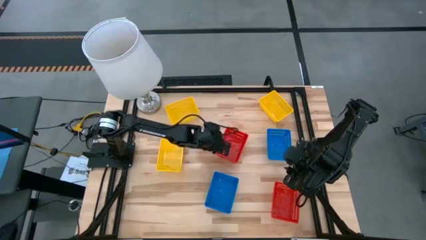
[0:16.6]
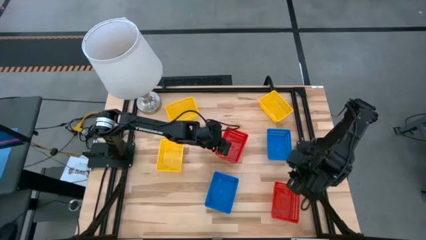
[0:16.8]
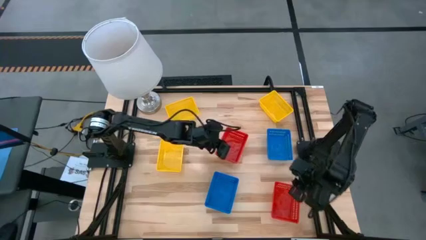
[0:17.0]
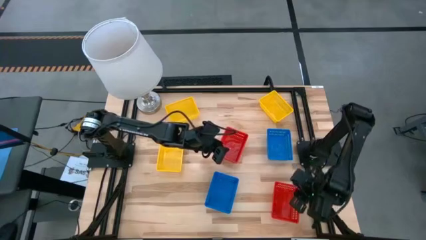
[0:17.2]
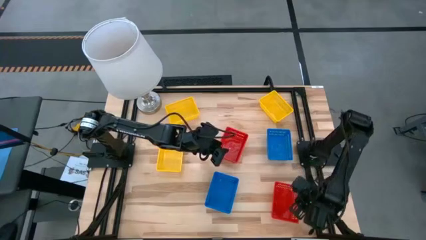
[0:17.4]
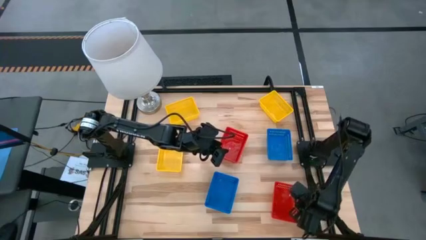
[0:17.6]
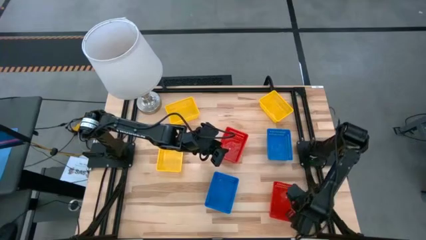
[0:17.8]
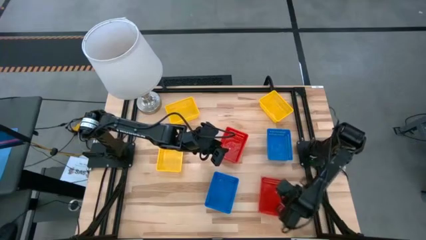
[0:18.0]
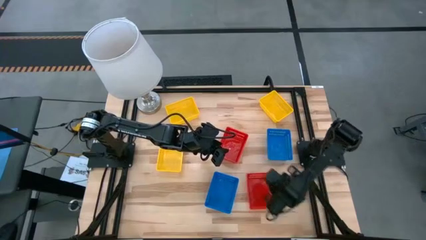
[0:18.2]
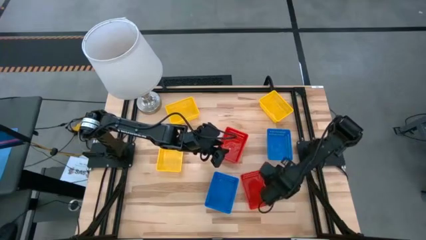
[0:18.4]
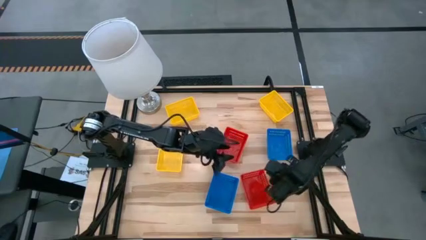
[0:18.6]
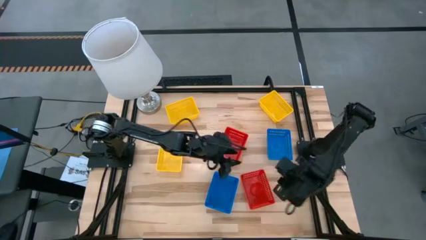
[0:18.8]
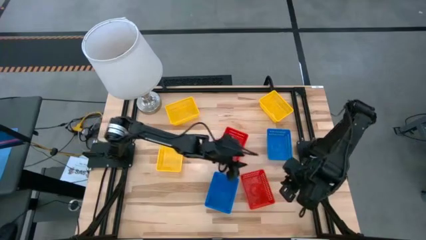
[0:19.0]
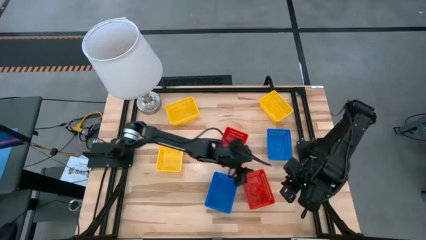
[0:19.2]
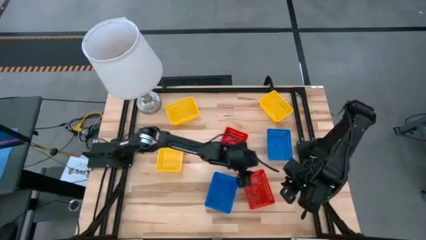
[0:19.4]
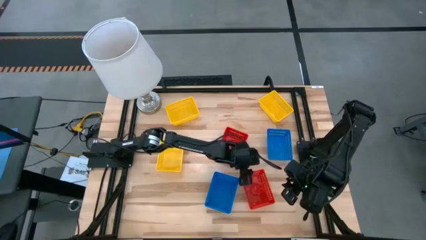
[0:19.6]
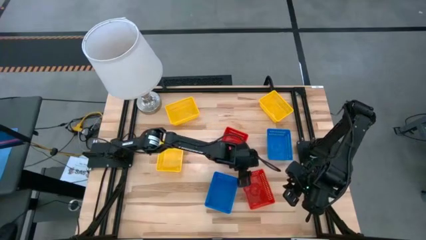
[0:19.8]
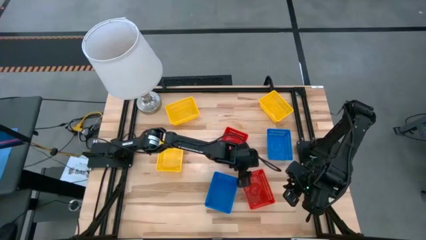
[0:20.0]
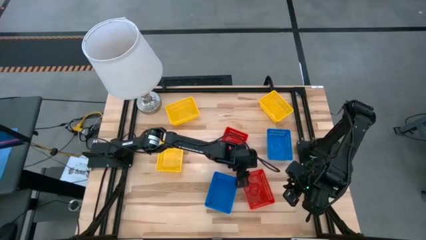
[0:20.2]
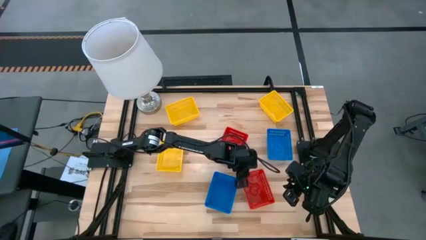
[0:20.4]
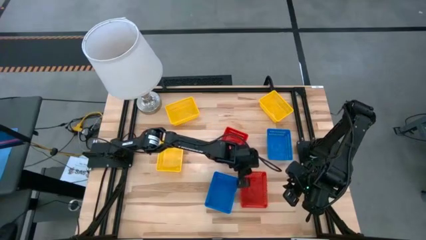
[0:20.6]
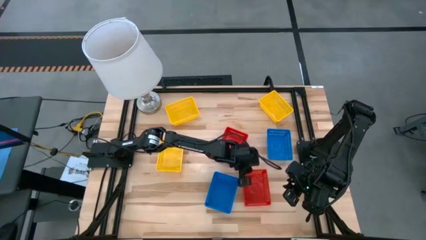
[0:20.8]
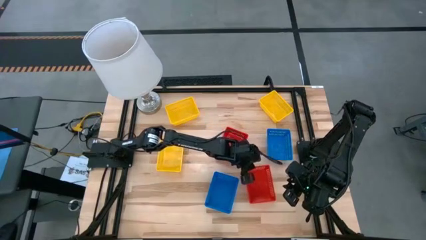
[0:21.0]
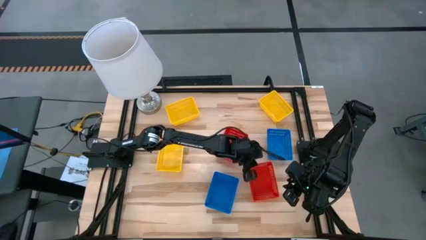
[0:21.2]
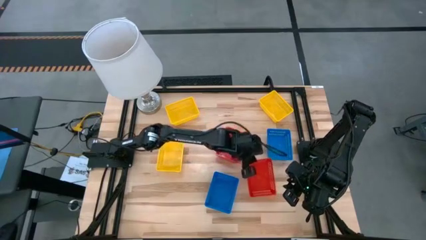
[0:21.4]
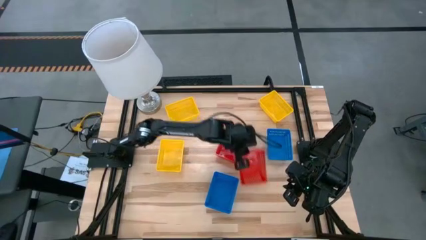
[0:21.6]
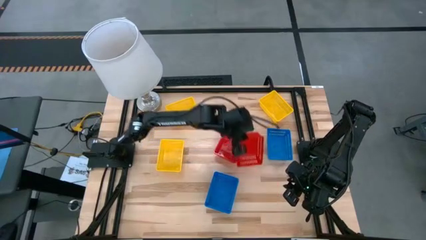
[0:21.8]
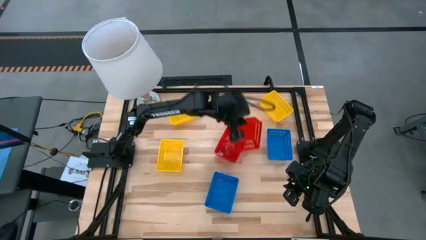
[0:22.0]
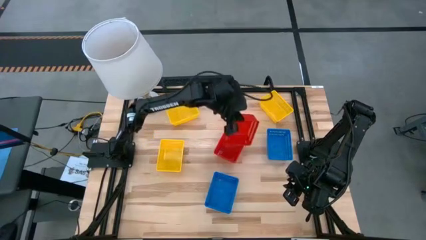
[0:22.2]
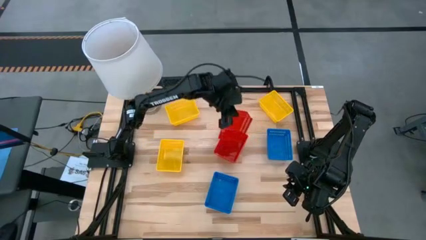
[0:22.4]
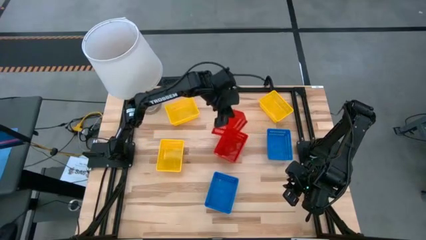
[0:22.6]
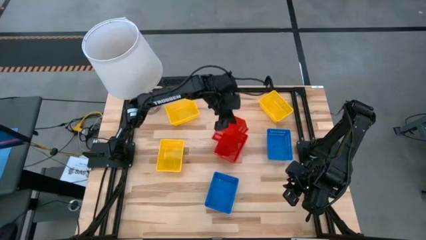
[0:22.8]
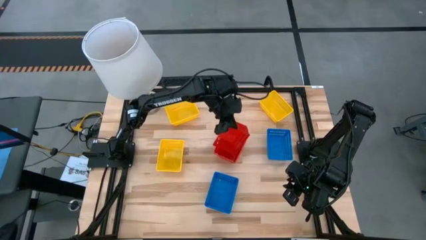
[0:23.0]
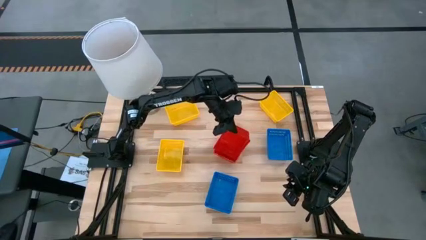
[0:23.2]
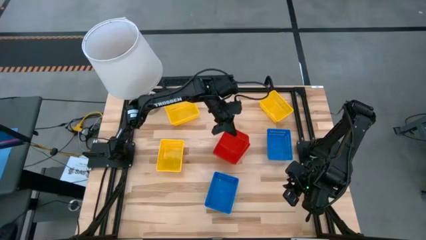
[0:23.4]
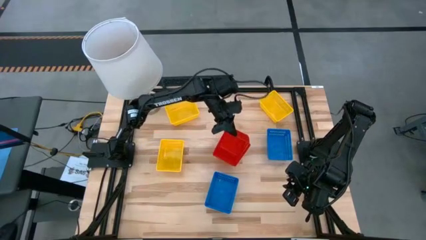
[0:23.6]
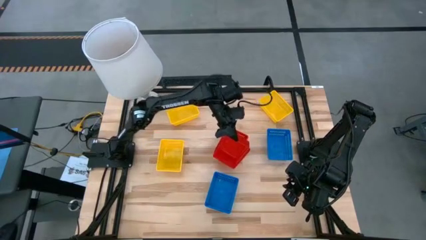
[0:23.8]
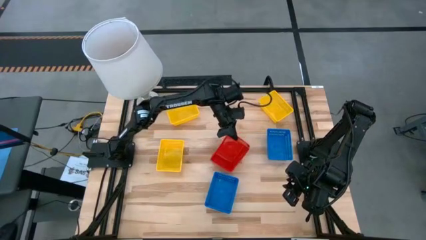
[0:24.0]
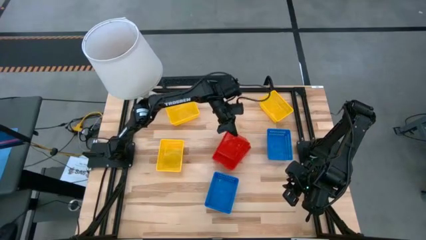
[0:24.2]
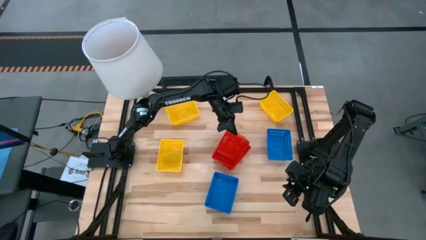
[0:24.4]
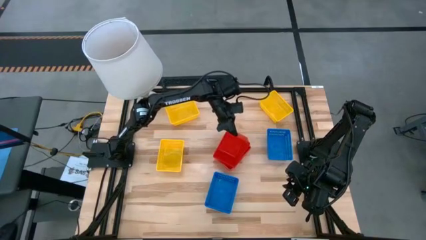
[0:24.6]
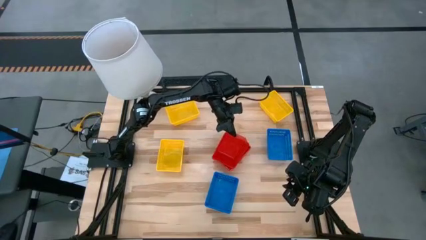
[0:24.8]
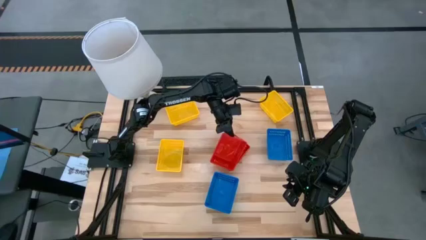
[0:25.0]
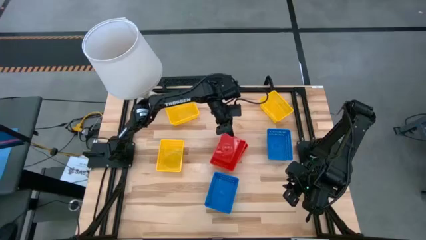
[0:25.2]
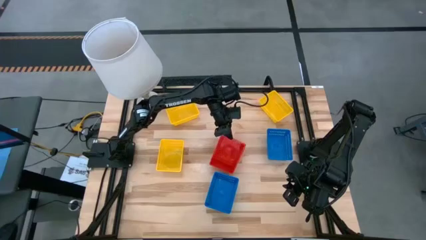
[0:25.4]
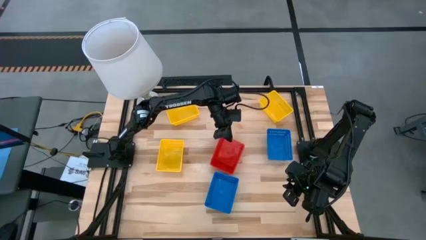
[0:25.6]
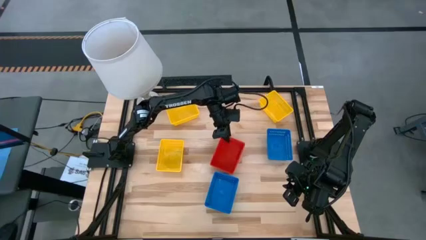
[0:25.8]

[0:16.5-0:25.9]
Stack the bottom red basket on top of the top red baskets

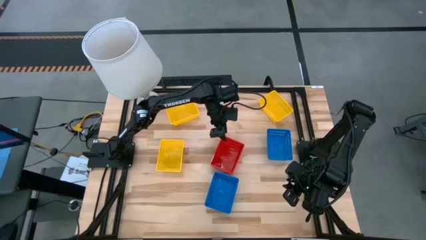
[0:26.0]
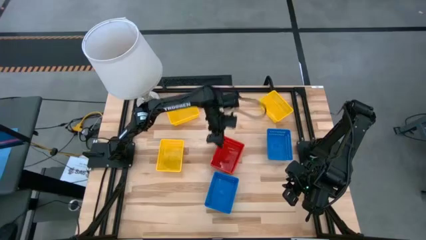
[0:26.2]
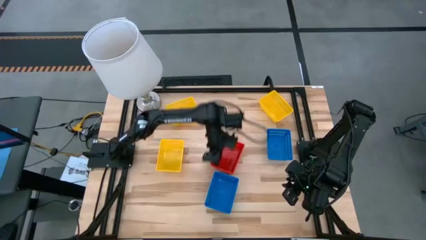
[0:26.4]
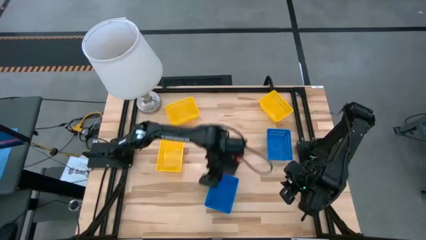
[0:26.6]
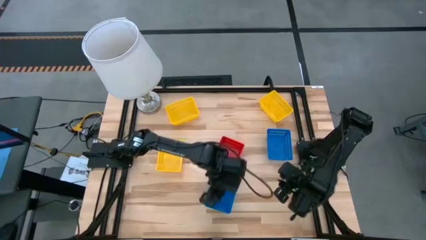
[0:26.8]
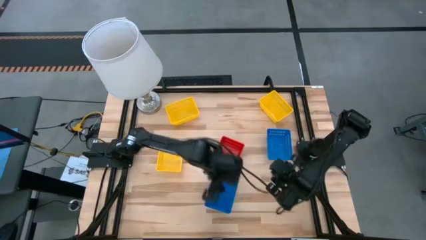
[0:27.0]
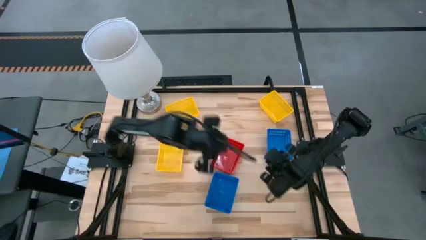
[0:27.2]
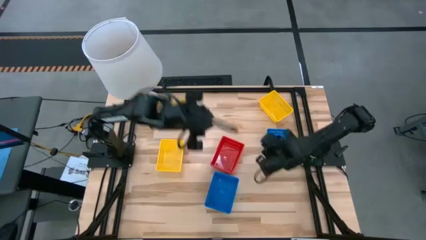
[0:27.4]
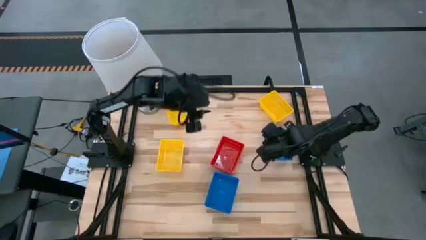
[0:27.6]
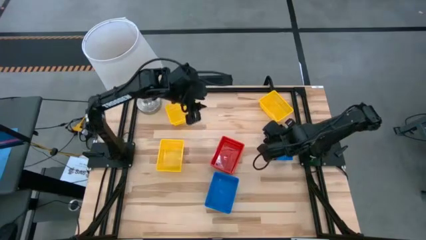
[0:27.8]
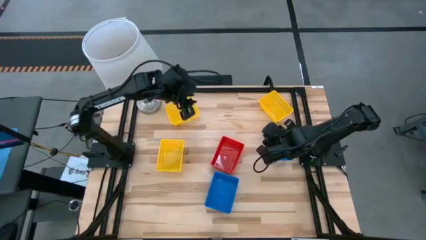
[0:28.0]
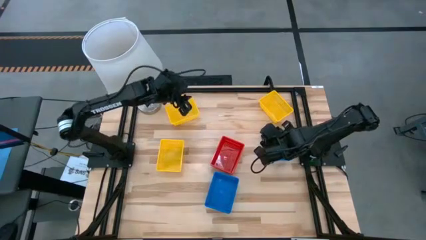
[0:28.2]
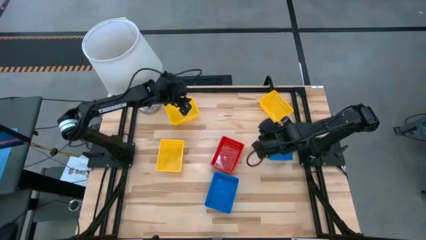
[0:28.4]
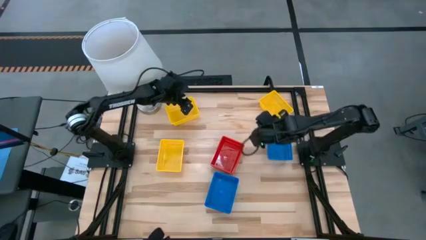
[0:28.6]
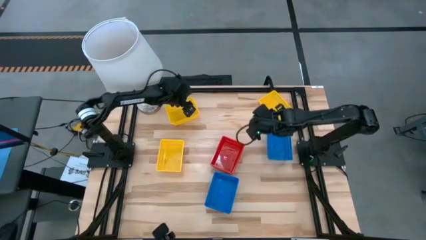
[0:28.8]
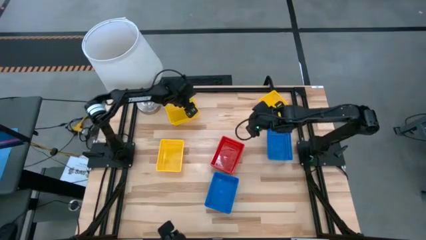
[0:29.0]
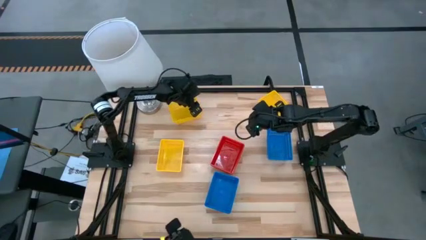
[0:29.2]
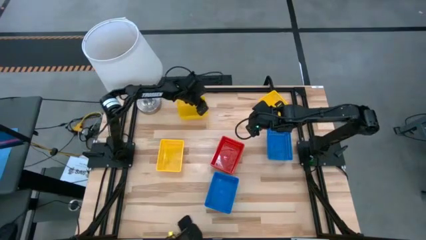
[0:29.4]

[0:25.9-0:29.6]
Adjust the top left yellow basket

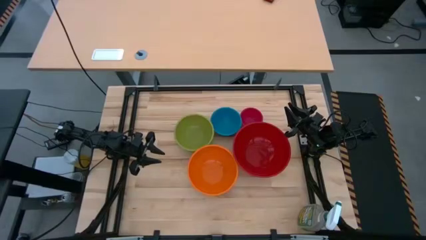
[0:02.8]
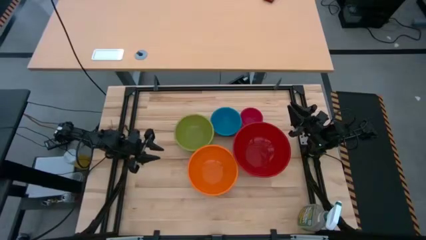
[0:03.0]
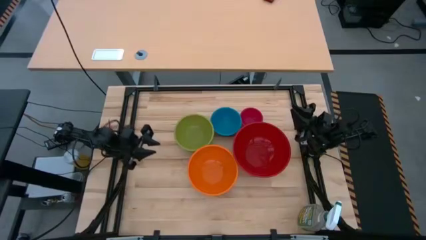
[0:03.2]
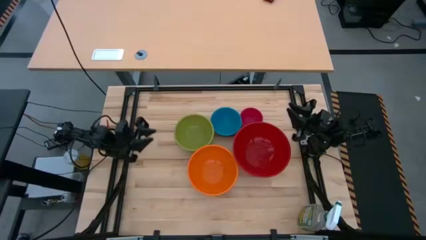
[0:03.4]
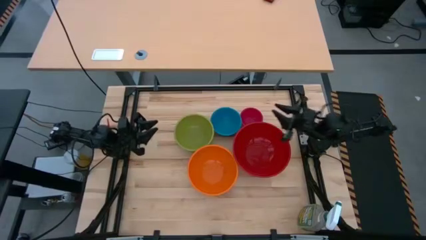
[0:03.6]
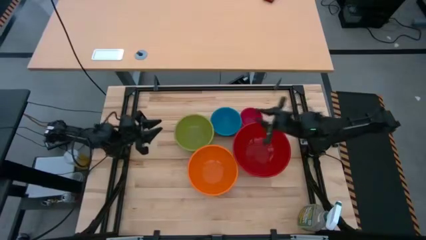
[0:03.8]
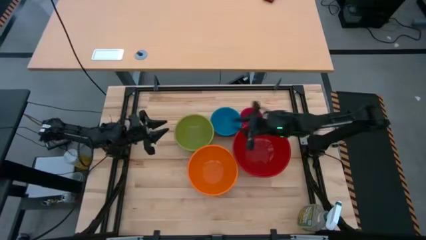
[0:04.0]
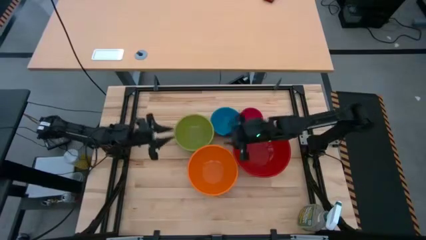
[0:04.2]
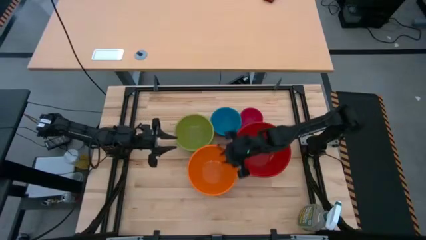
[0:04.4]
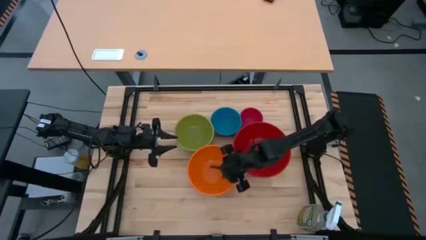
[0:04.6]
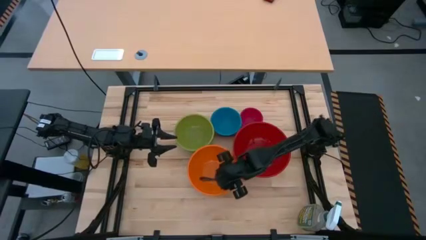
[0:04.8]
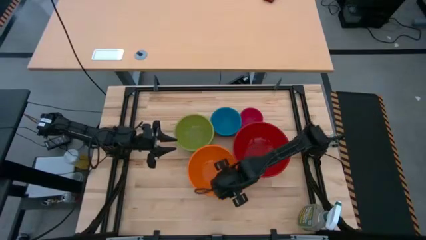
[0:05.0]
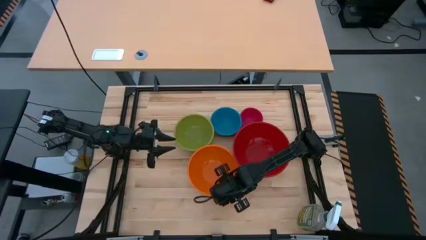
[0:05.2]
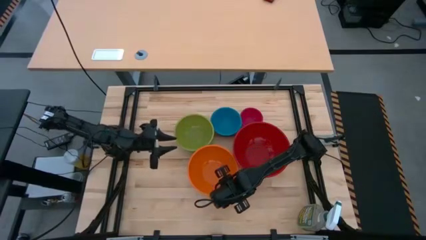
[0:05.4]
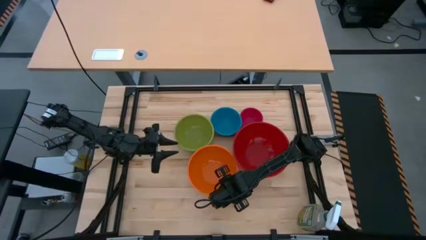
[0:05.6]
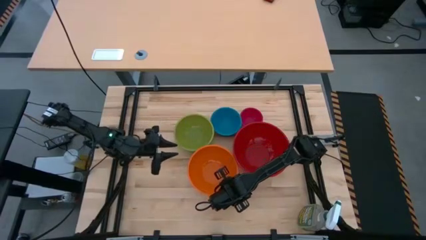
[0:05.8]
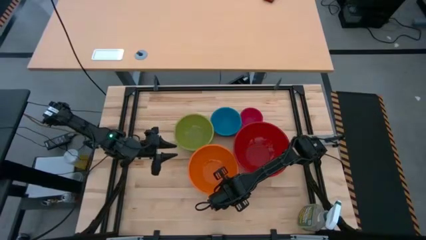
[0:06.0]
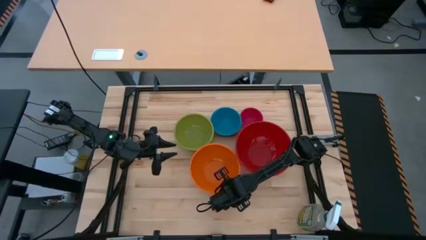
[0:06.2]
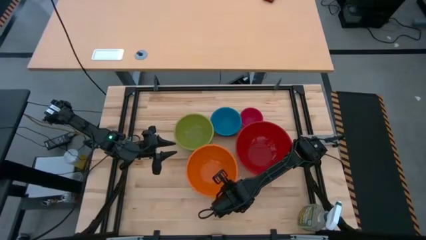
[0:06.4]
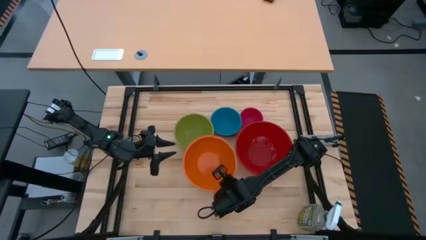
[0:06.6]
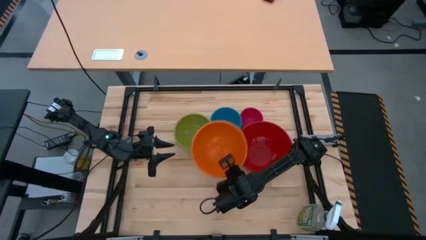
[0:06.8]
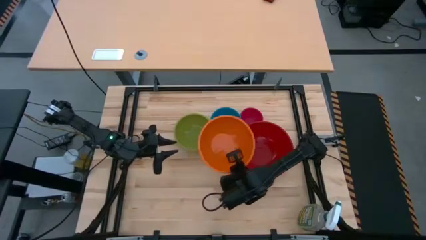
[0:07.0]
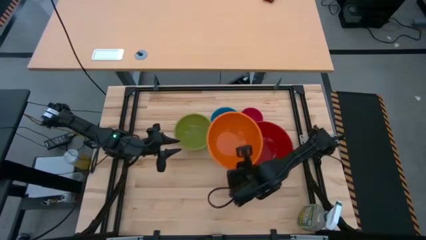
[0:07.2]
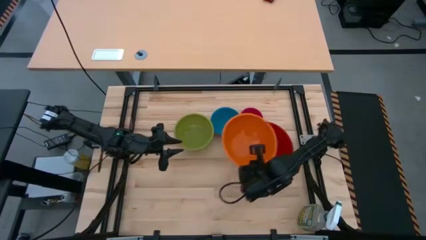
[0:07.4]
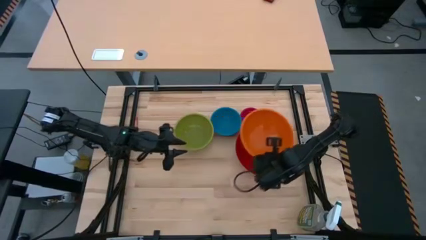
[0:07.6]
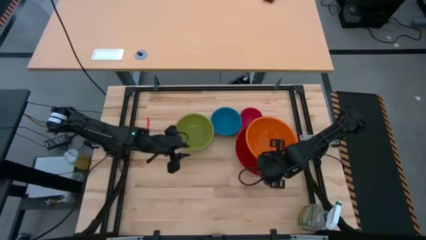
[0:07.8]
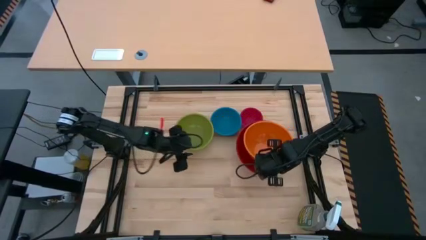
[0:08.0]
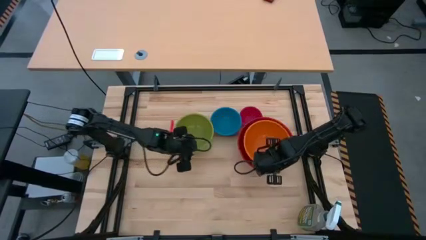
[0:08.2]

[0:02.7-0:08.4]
Stack the orange bowl into the red bowl
